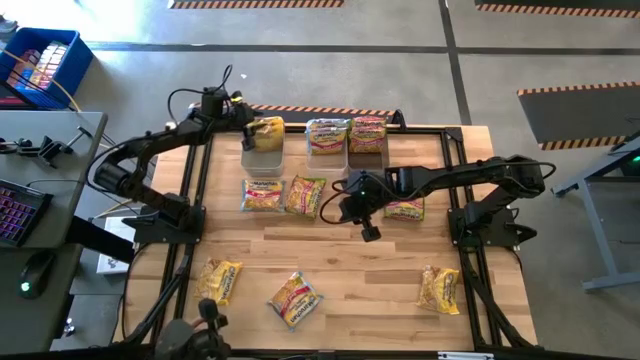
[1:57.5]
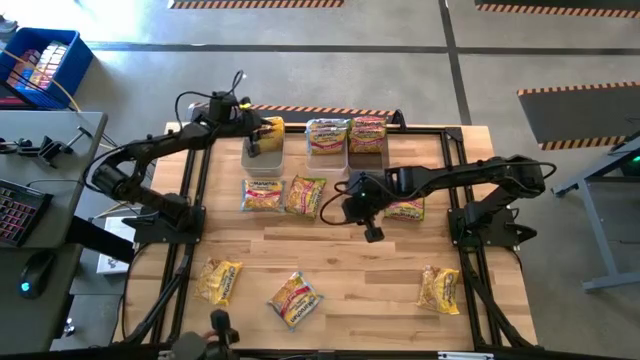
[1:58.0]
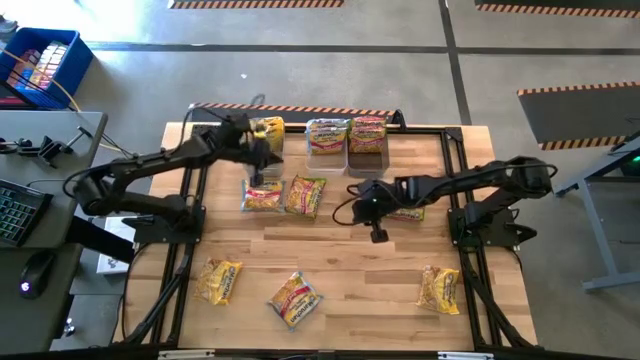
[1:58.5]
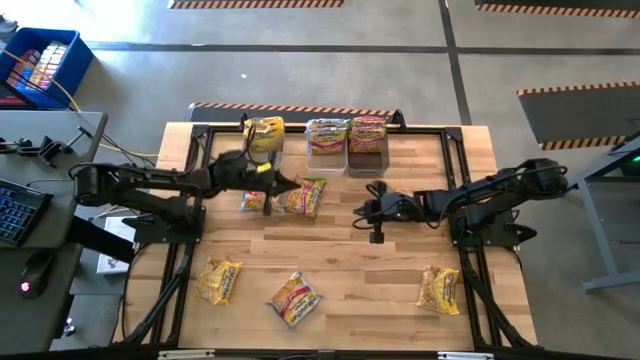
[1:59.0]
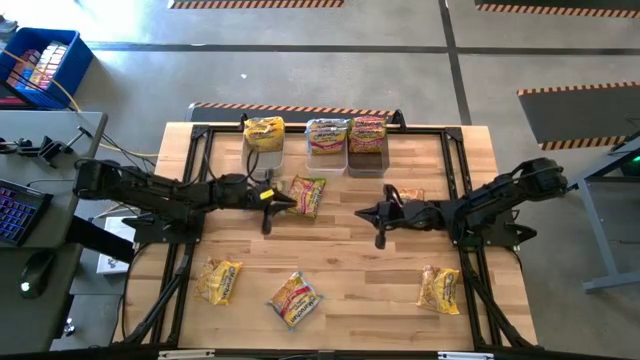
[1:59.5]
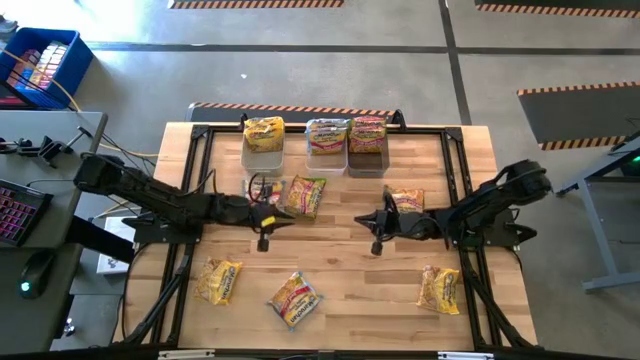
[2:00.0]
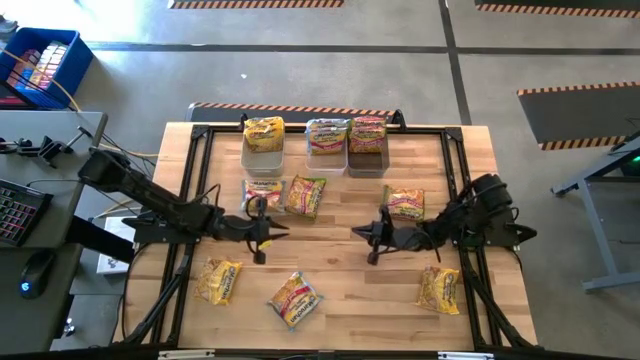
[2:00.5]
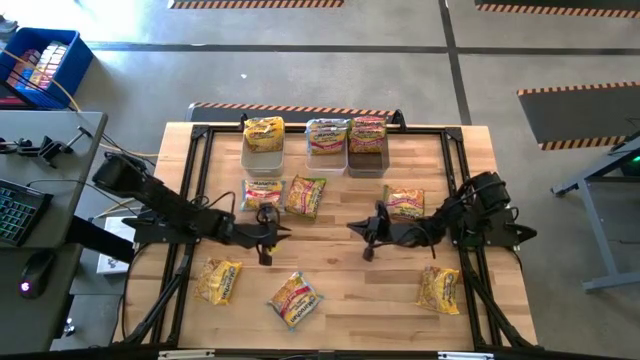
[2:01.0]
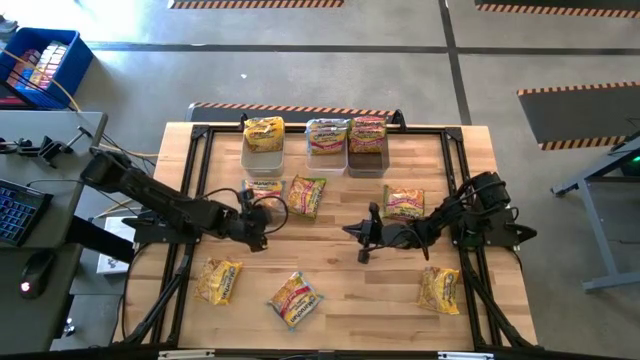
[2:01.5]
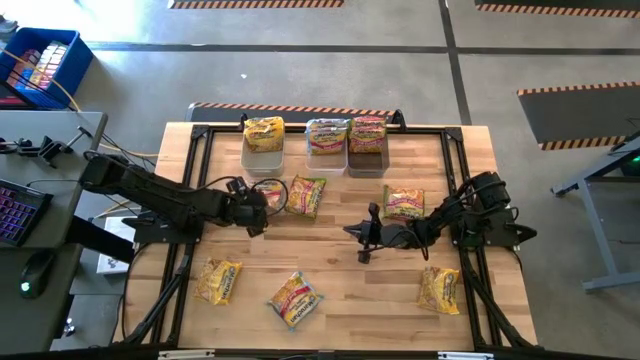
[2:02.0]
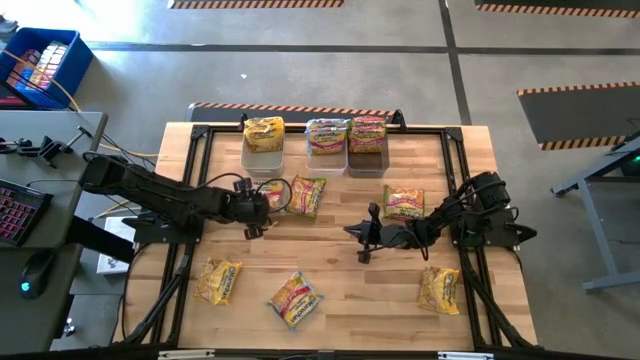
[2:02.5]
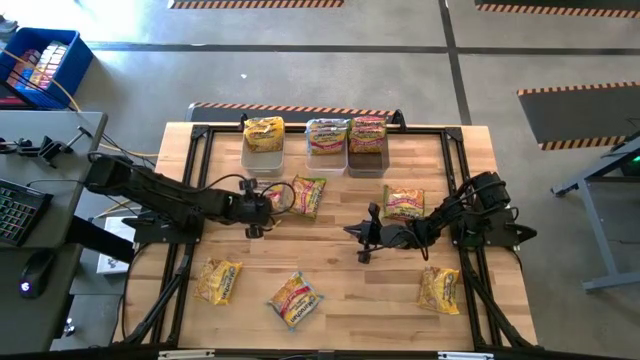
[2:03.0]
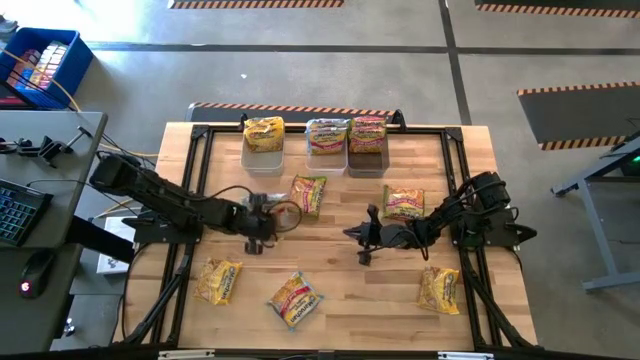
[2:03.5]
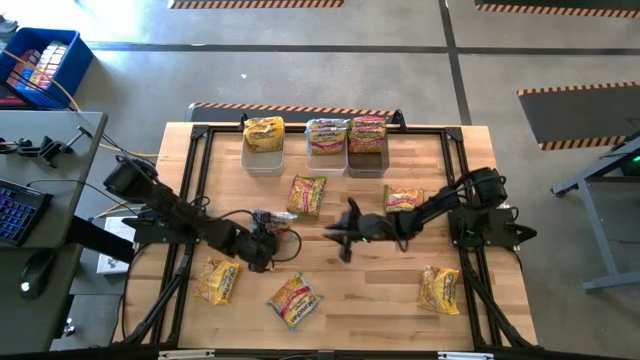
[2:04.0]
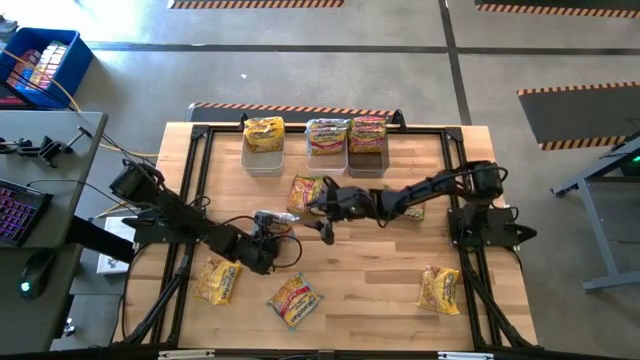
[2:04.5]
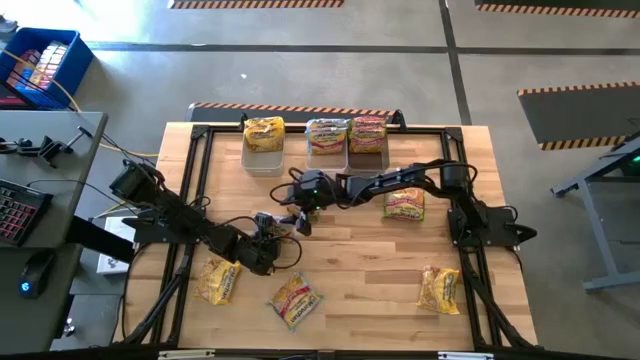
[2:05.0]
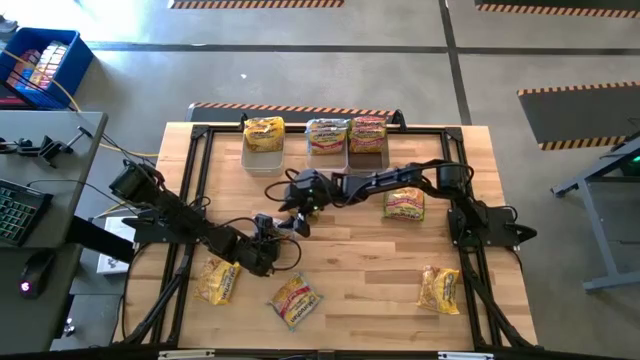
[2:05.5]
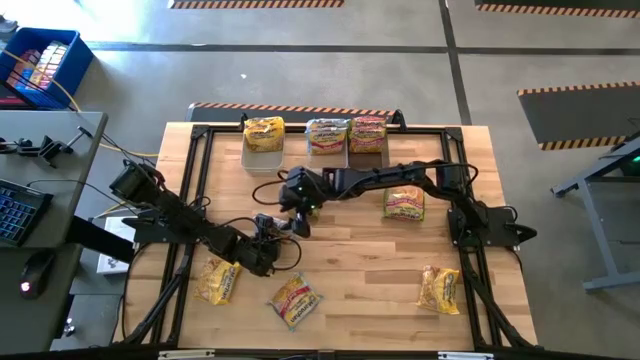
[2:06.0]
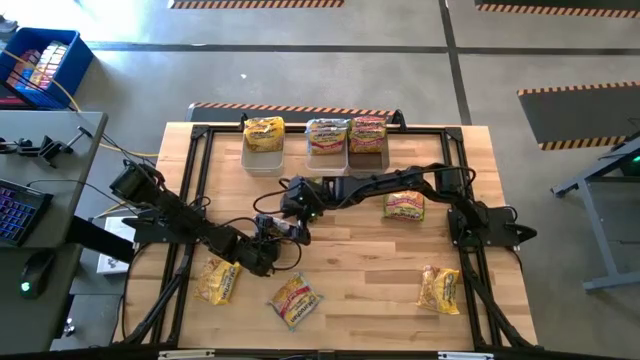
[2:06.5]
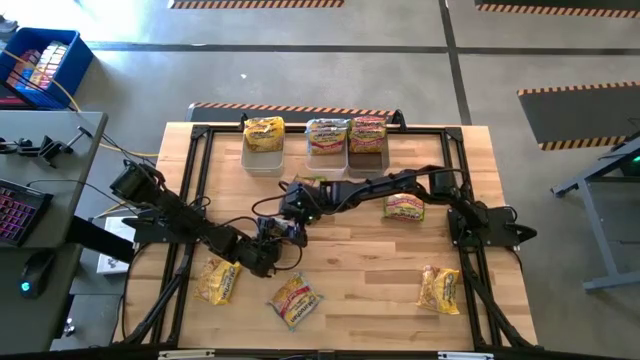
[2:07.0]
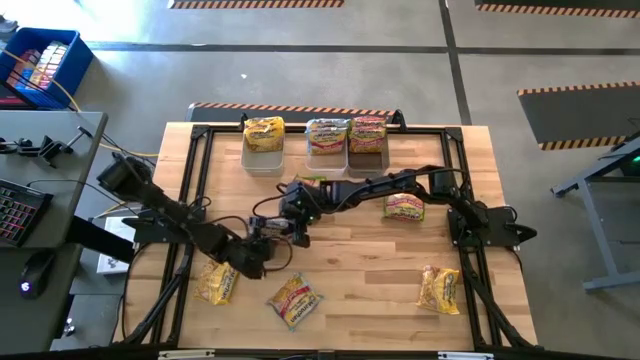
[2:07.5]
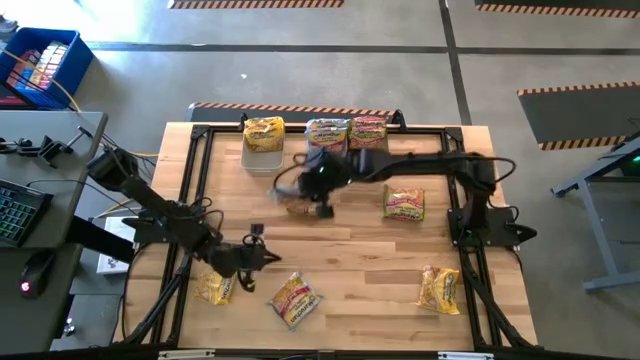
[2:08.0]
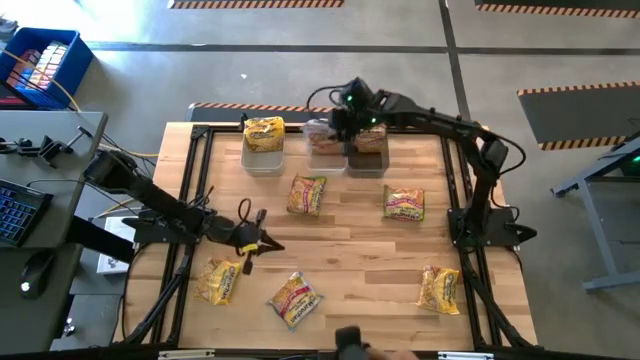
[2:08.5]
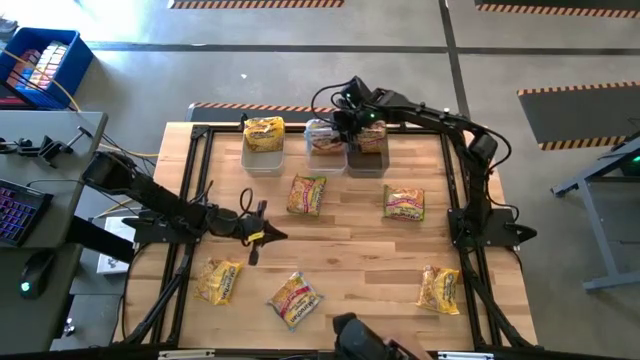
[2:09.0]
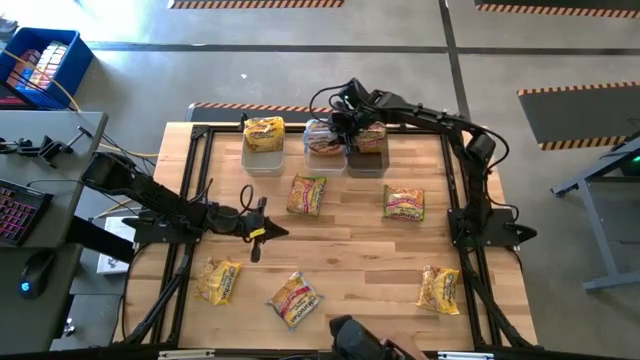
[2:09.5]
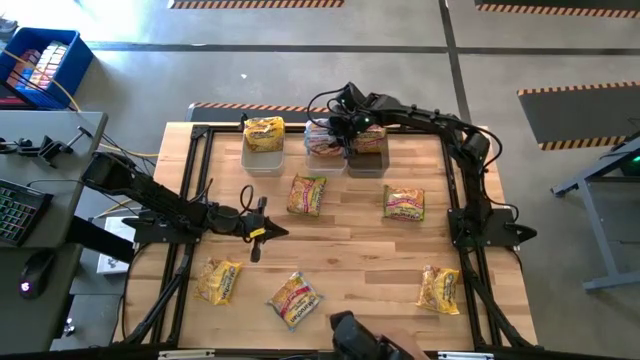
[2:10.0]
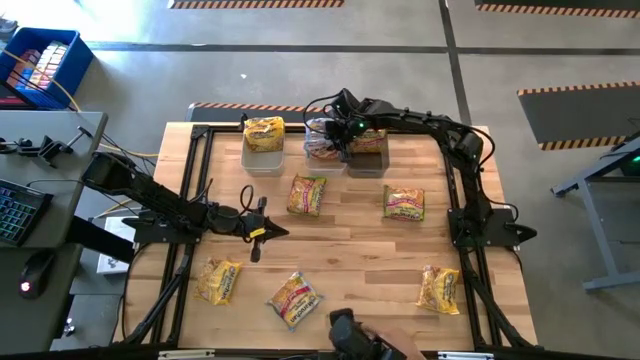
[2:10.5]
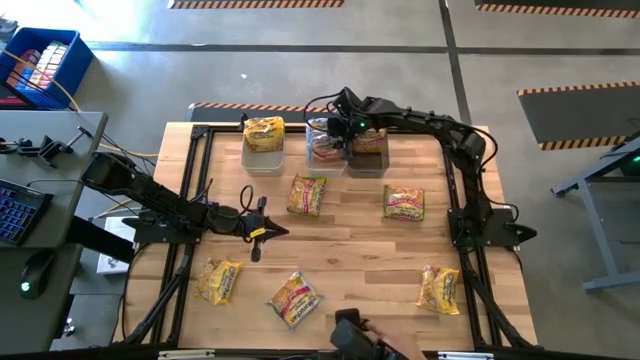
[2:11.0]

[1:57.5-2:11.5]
Task: Sort Maruchan noodles
Put the top blue noodle pack into the transparent white bin

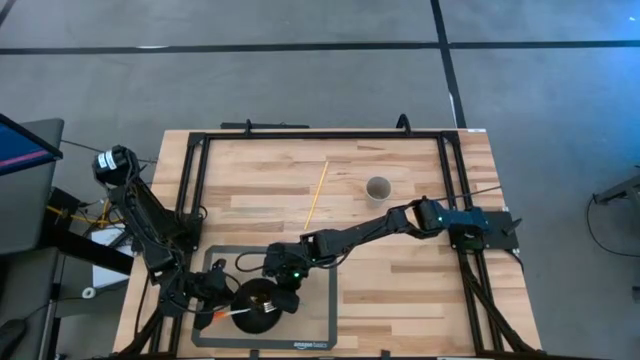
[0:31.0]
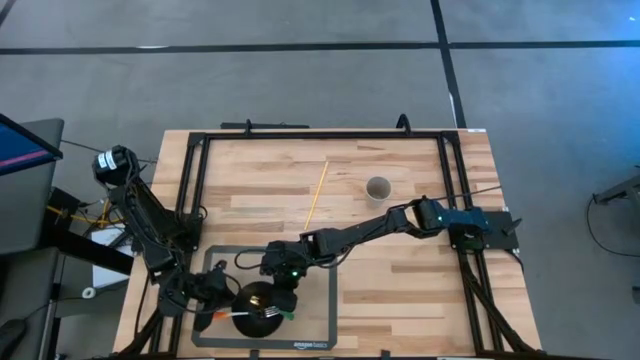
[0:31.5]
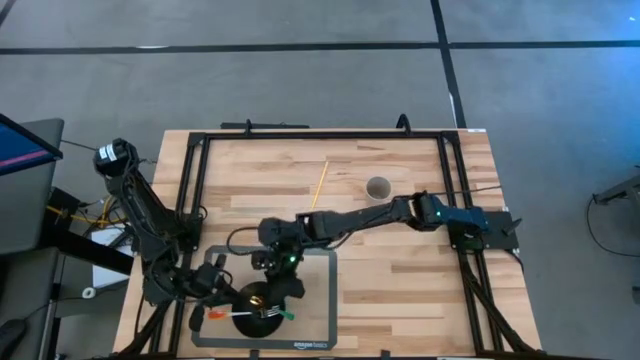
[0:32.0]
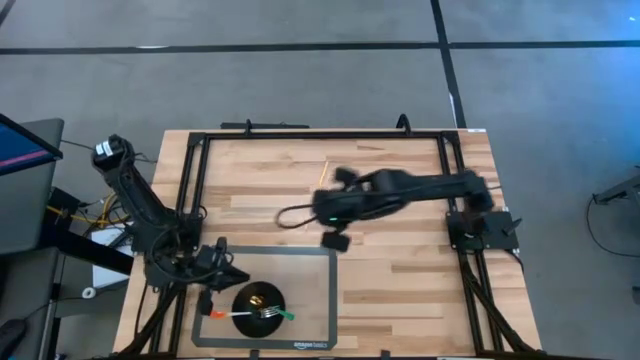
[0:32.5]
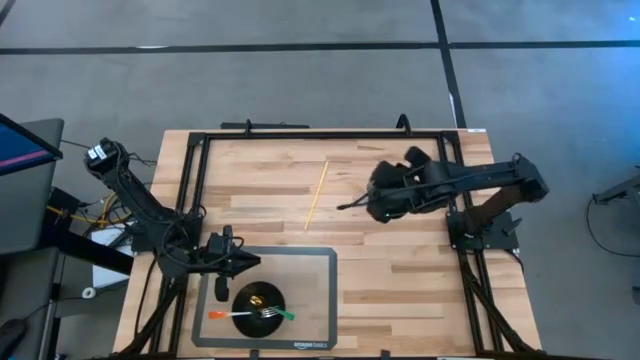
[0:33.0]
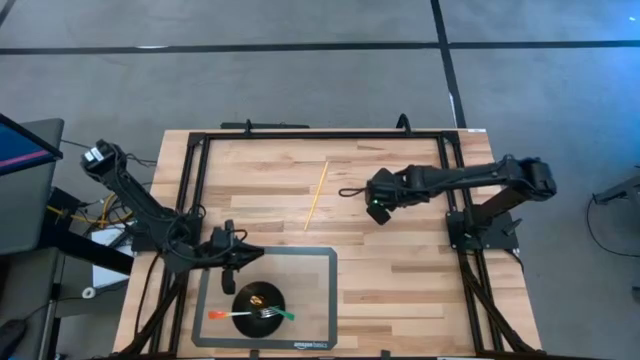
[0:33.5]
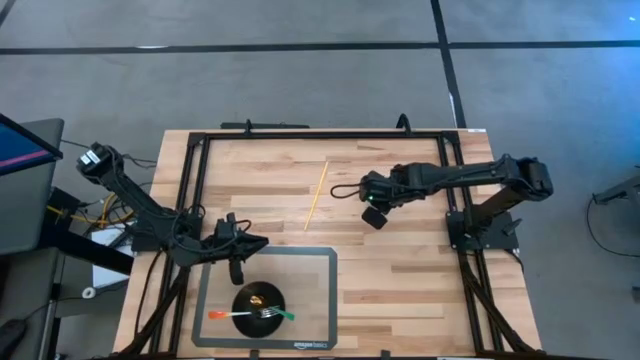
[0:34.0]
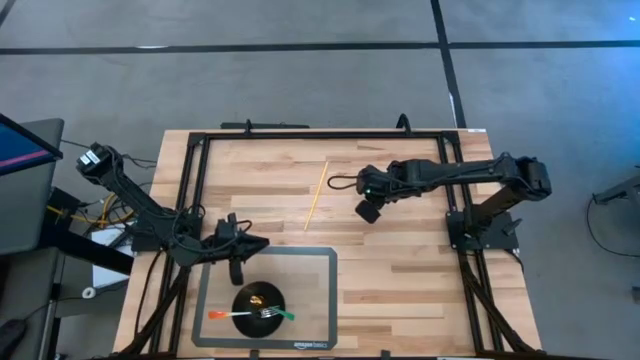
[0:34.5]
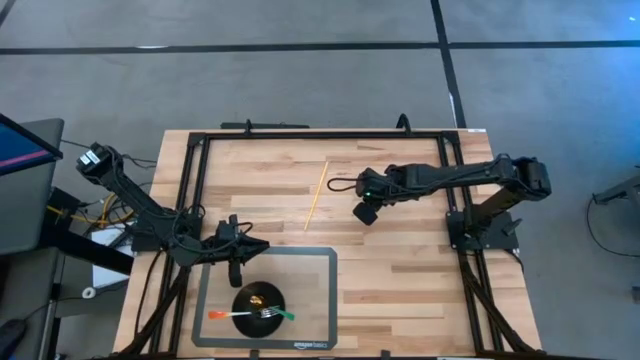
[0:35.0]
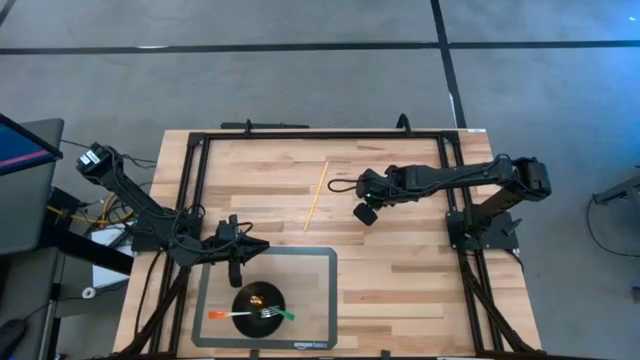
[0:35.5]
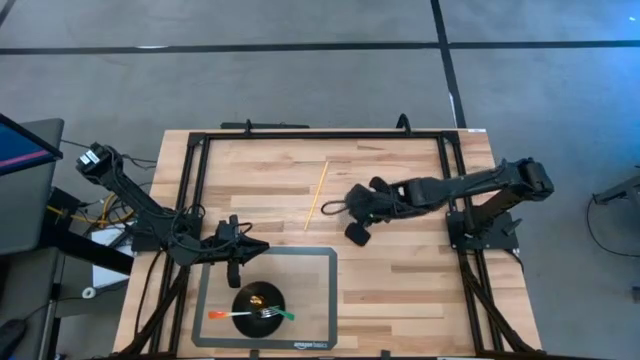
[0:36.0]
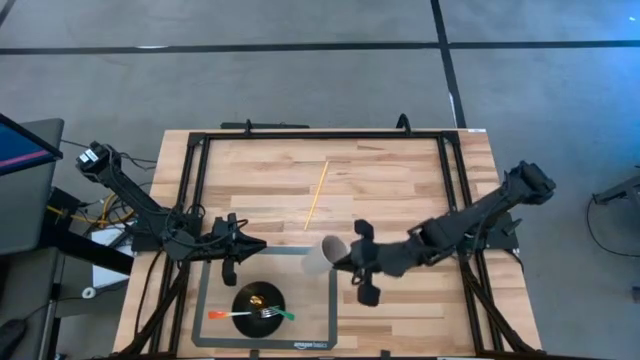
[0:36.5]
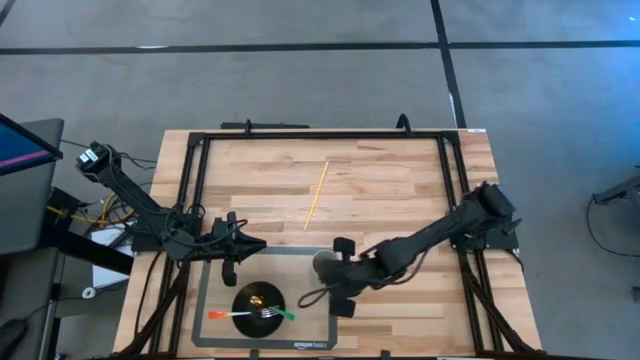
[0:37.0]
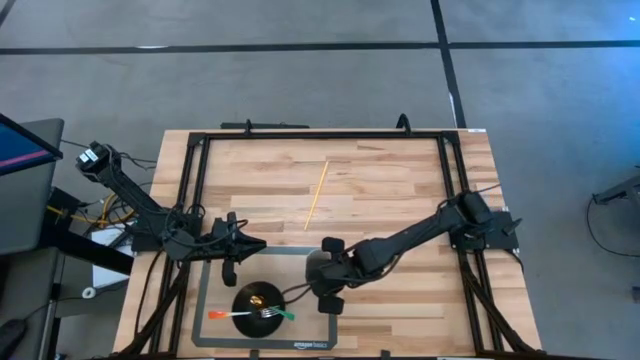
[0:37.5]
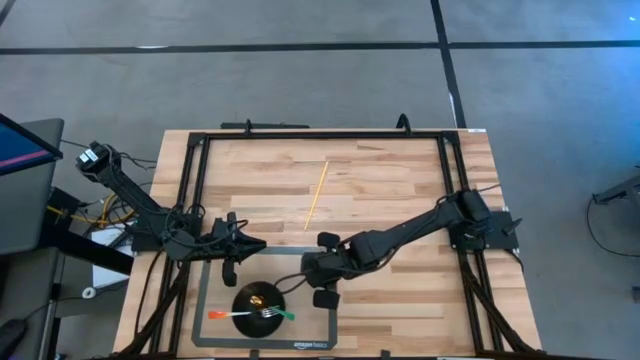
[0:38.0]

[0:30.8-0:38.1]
Task: Pick & Place Utensil
Put the white cup on the transparent mat to the top right of the black bowl
